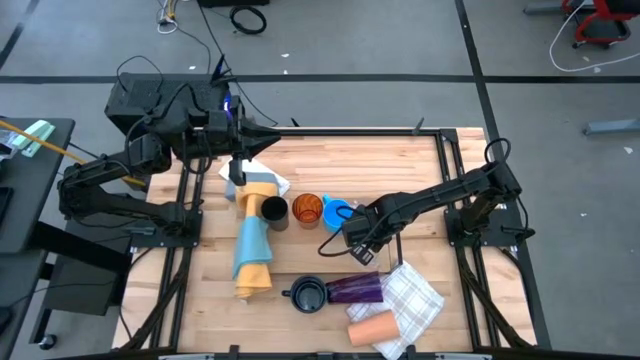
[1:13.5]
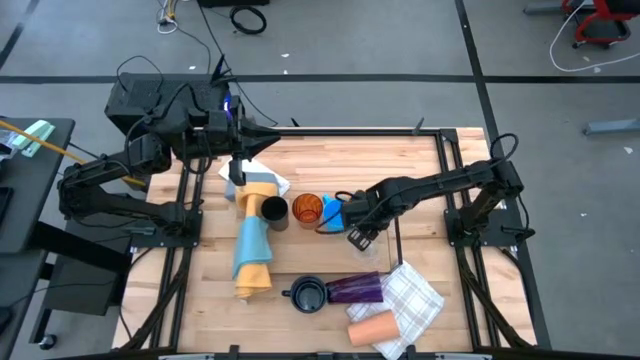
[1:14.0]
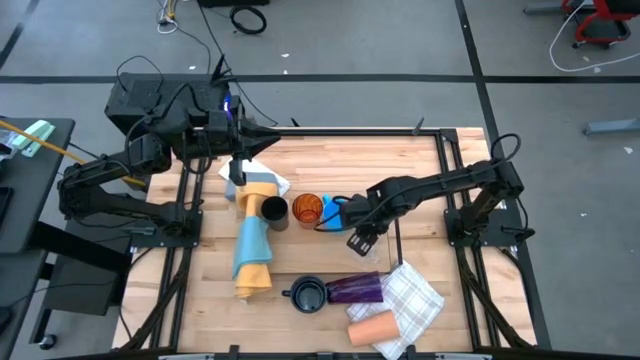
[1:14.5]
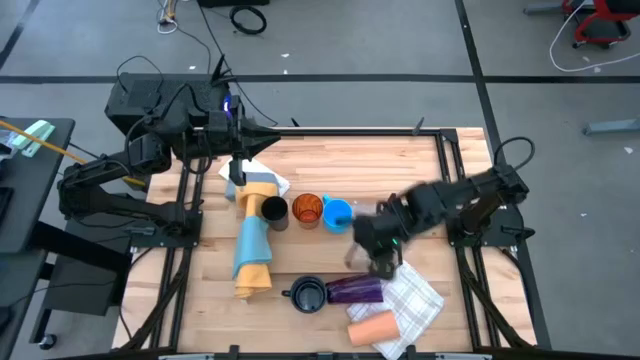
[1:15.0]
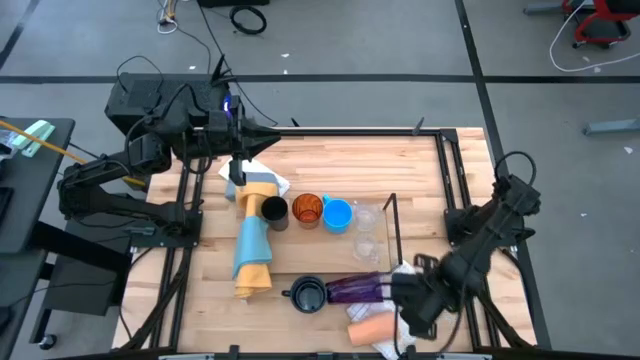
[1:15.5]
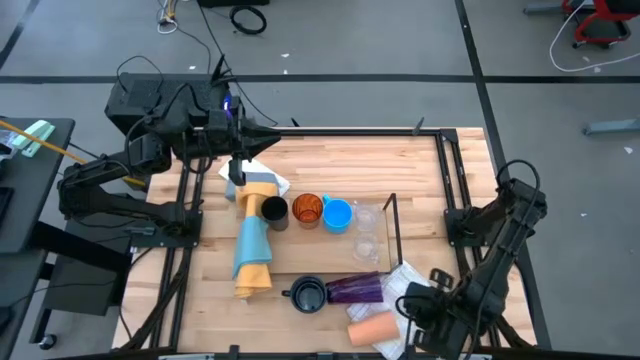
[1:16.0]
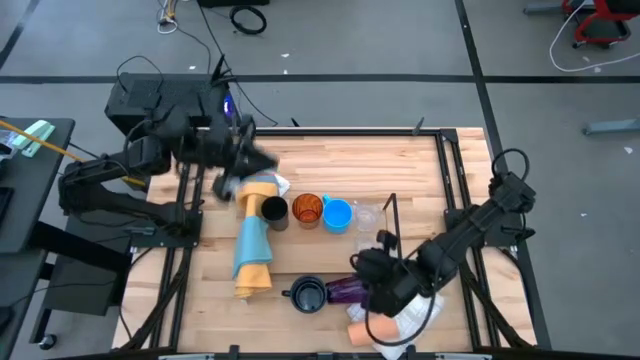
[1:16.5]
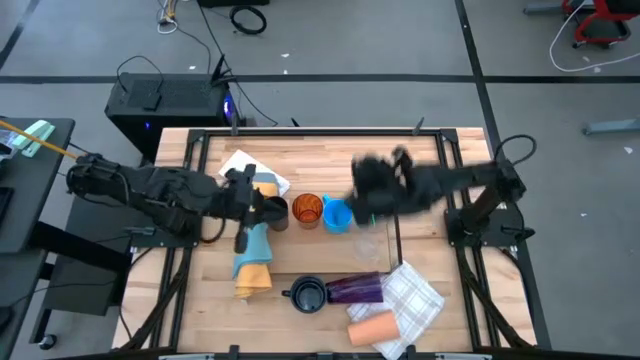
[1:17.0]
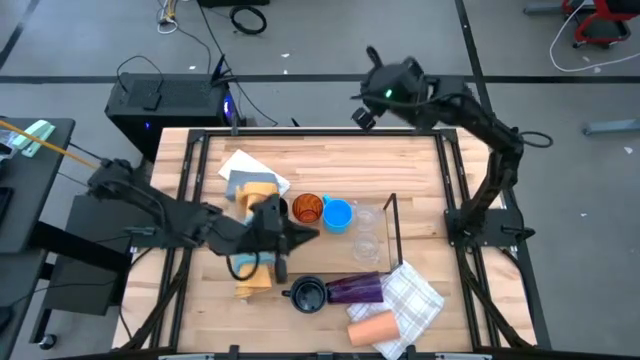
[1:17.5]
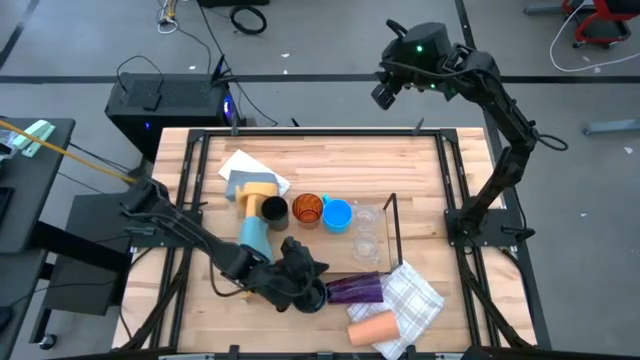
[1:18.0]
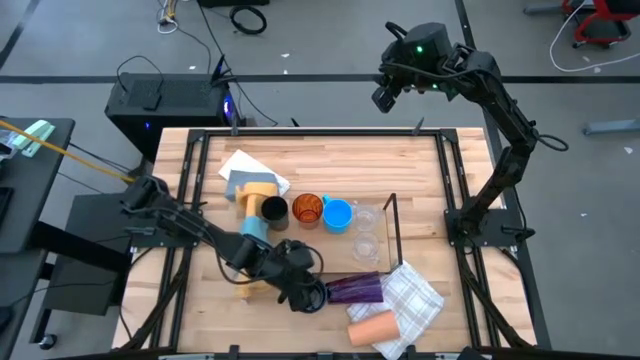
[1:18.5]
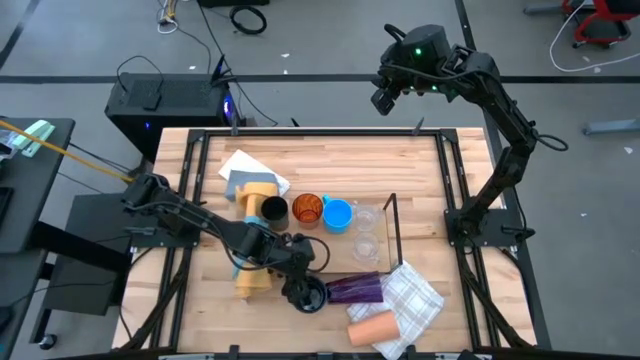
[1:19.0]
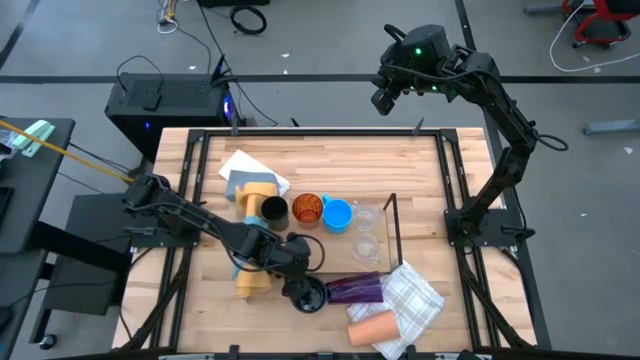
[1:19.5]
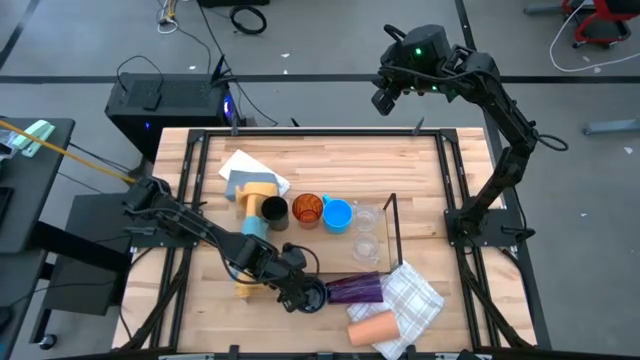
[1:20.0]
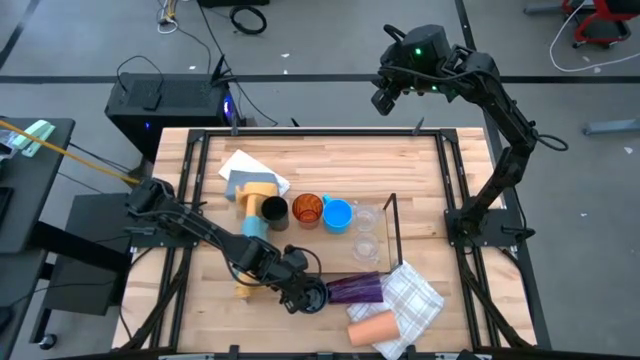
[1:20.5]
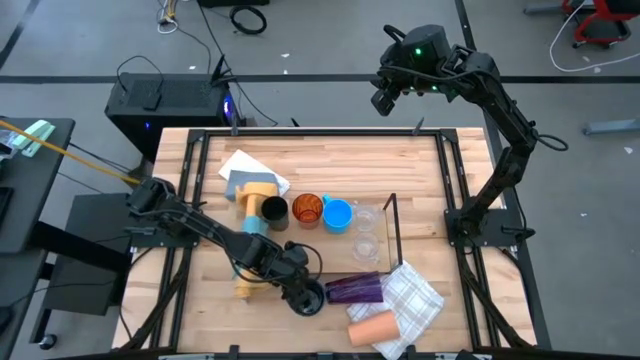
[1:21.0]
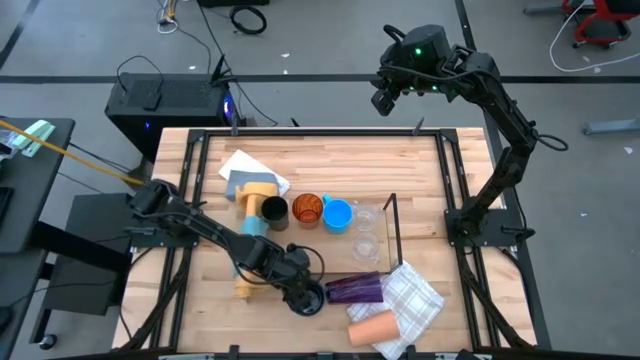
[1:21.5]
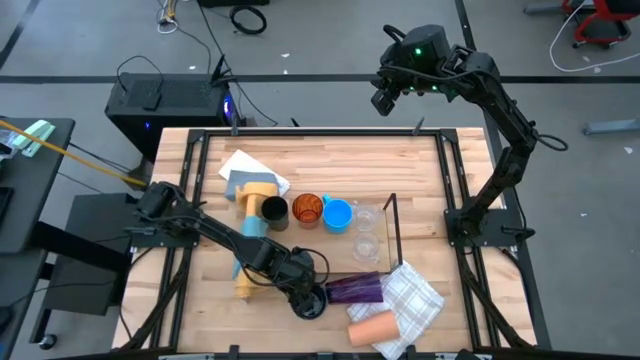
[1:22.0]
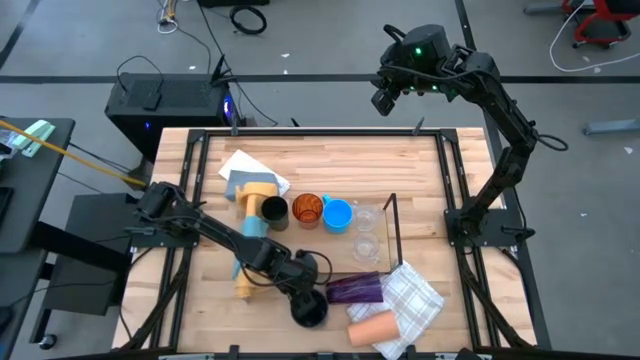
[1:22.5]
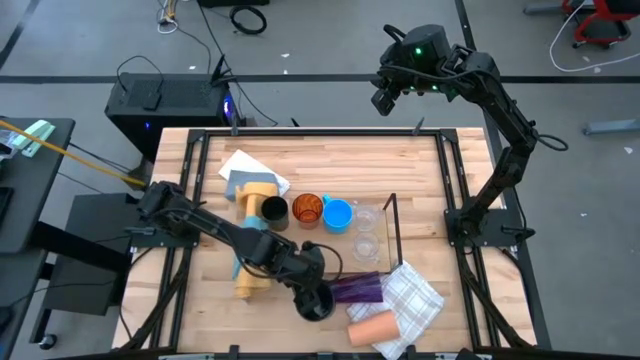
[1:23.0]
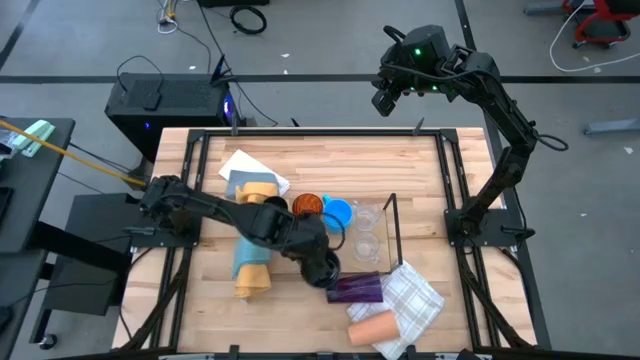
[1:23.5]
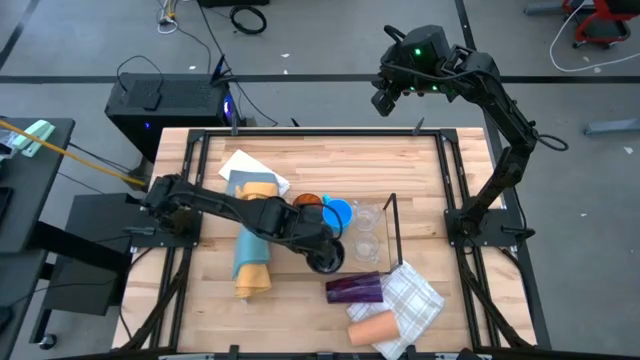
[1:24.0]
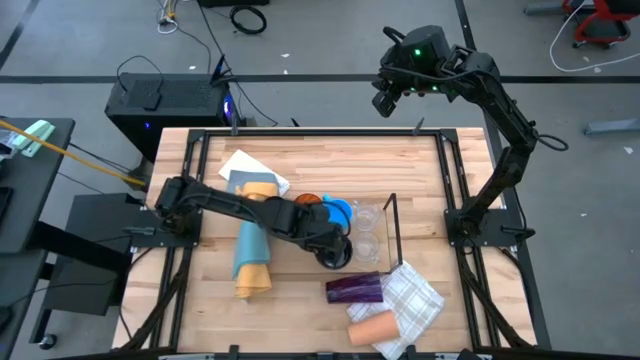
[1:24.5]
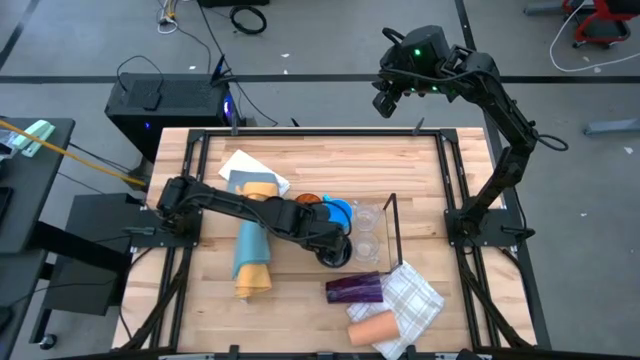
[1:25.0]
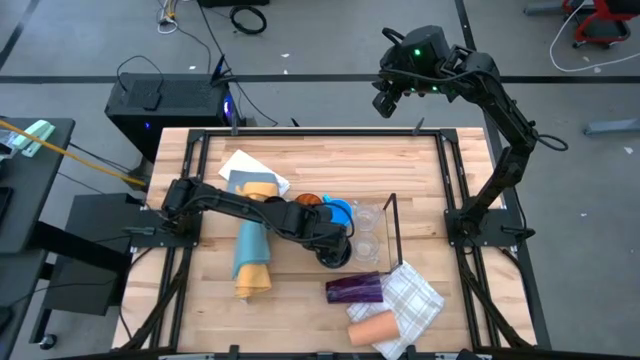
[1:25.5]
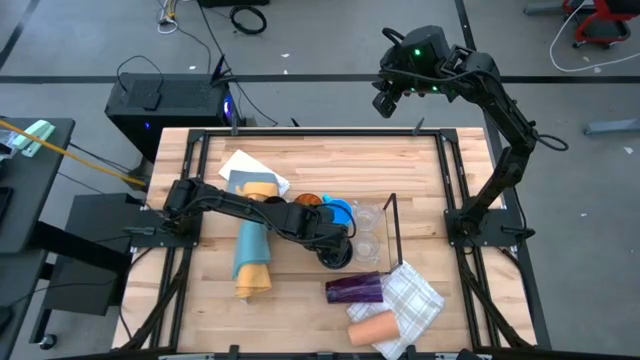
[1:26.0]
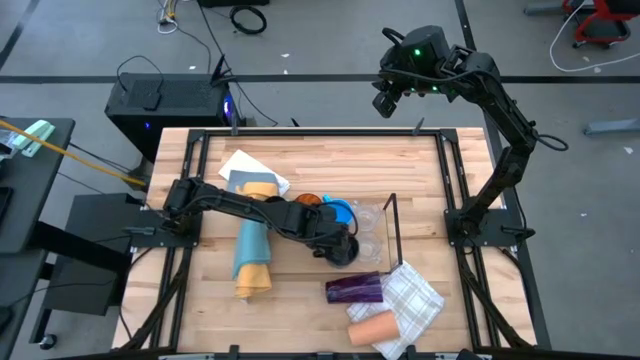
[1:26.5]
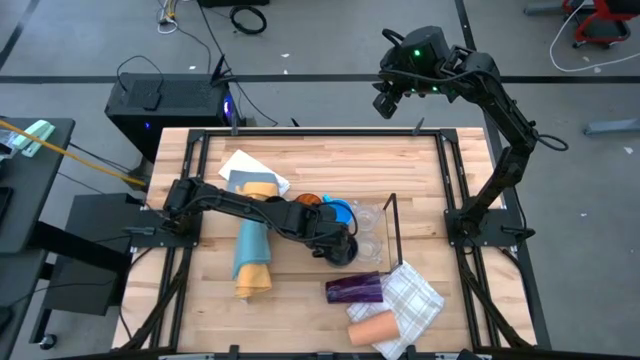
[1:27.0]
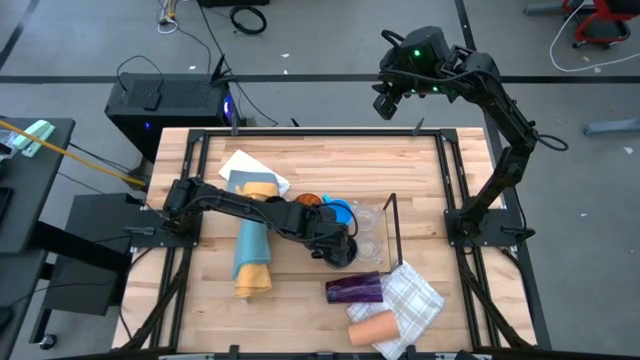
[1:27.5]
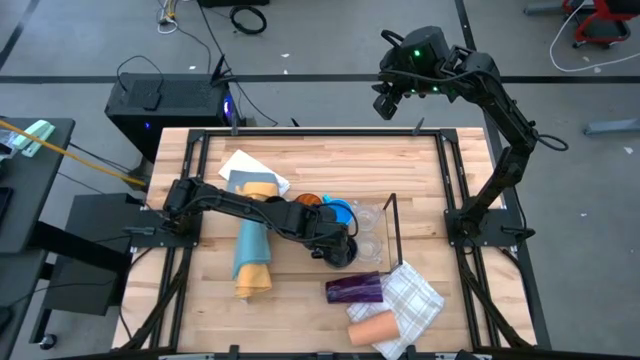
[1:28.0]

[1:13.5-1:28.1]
Task: Stack small to large cups/mugs on shelf
Put the black mug on the shelf

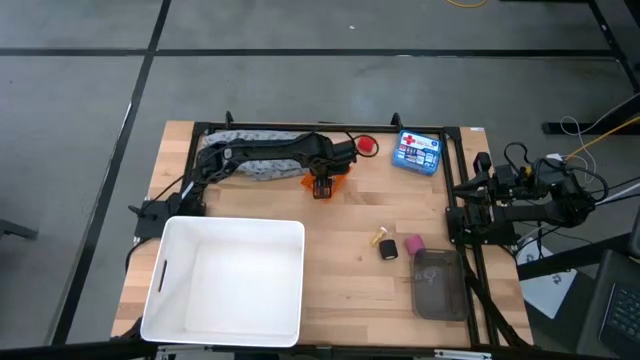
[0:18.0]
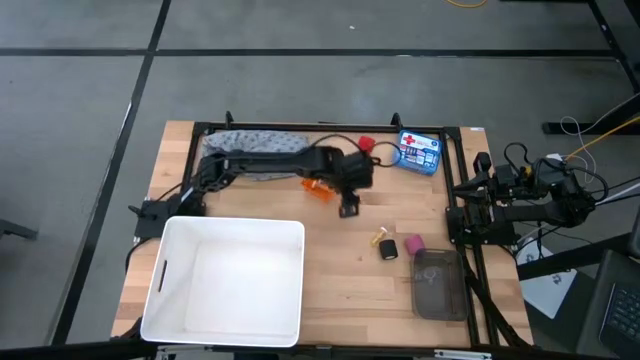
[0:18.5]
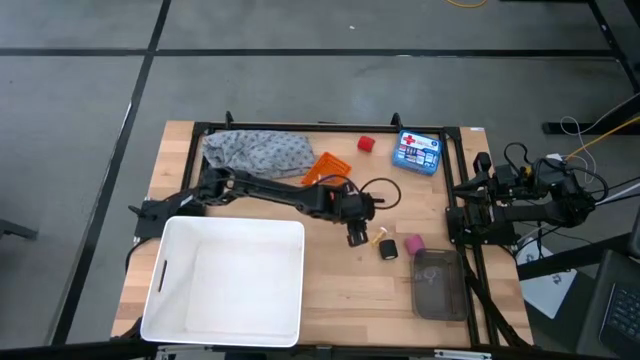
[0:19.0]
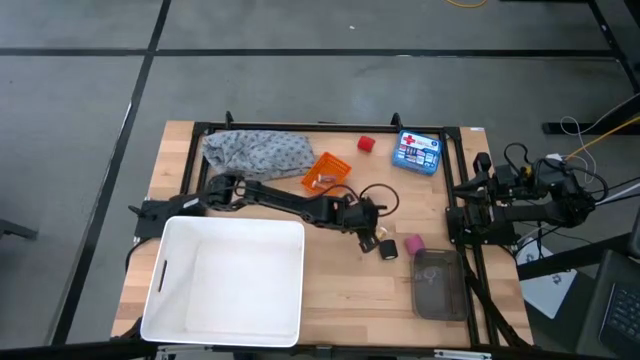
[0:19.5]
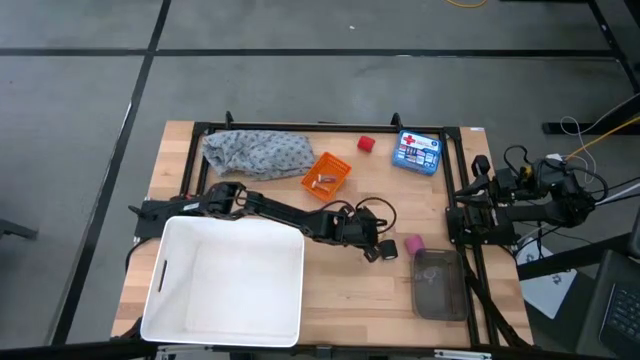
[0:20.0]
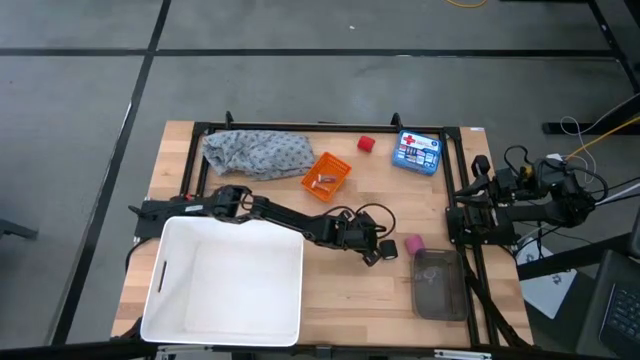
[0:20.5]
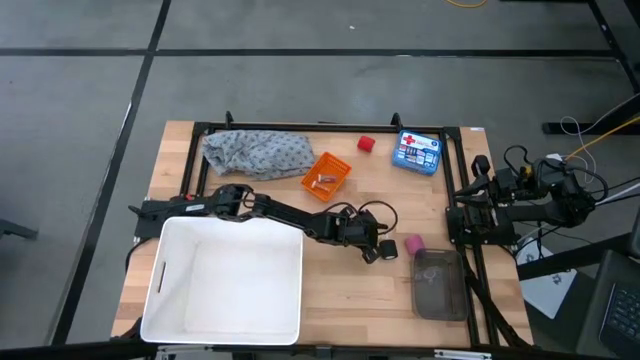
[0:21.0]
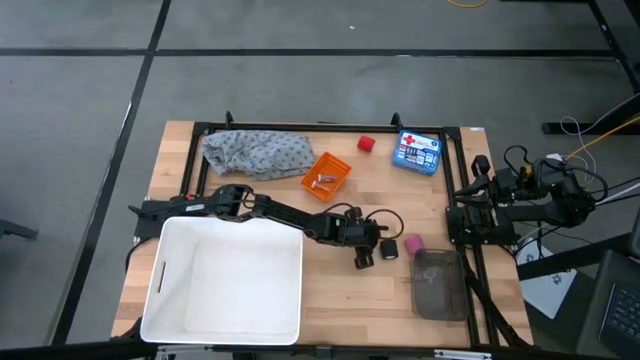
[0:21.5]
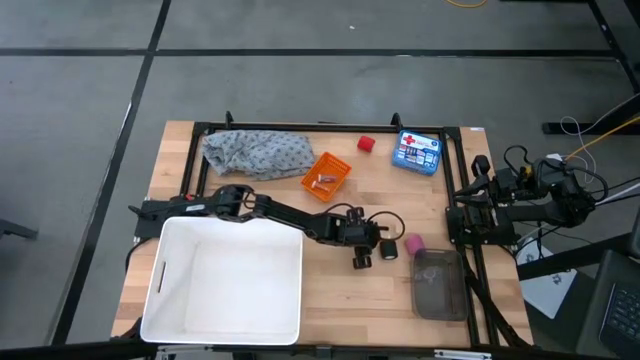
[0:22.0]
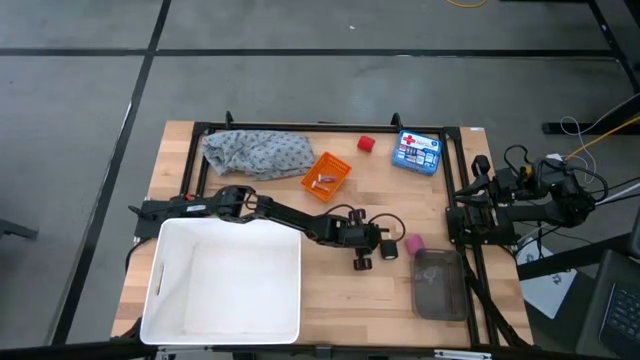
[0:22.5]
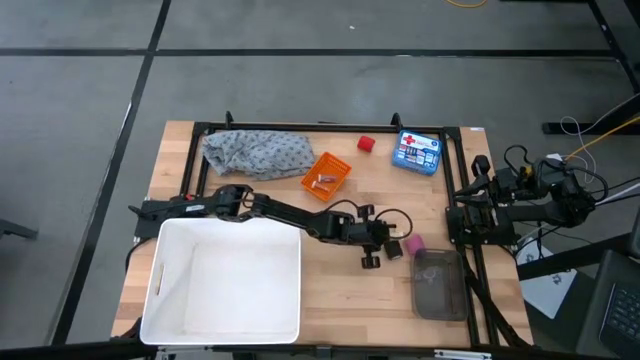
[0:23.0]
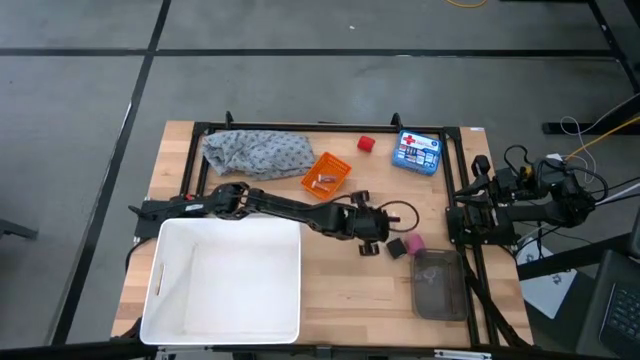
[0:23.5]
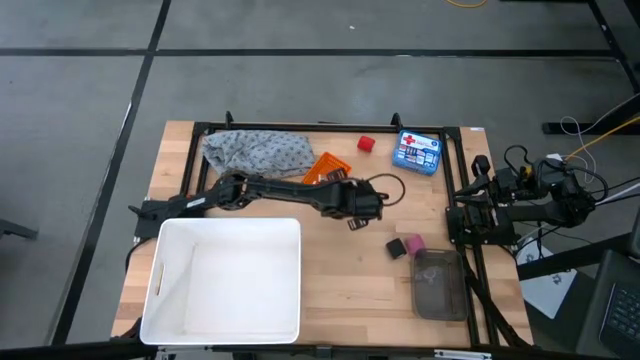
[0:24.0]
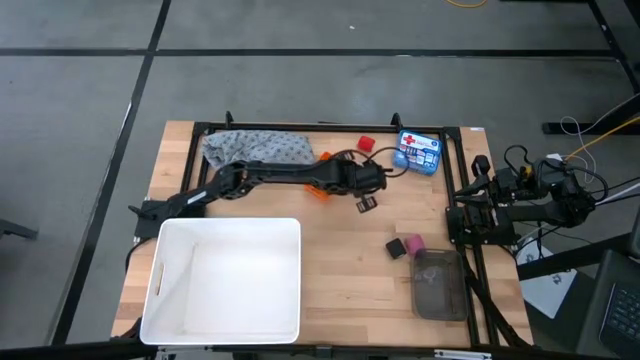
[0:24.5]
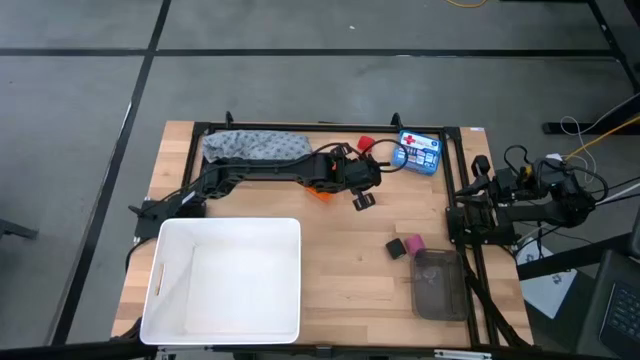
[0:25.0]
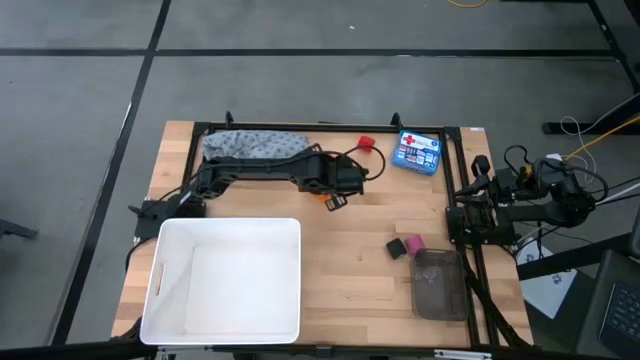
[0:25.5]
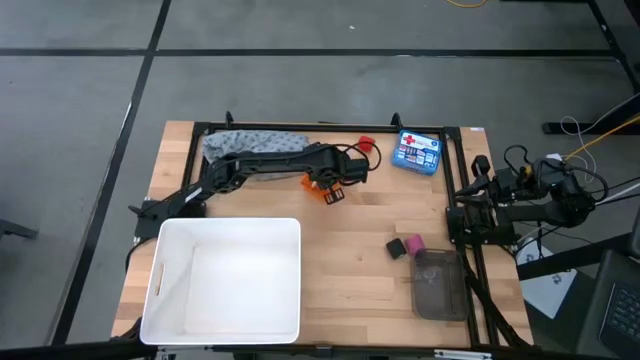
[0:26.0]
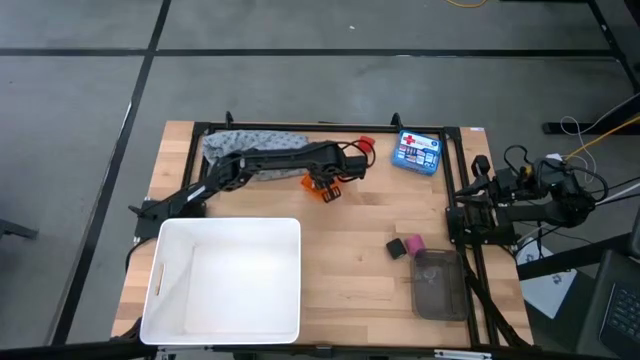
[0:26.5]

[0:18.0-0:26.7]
Task: Pick & place medical supplies in basket/bin
Put the yellow pill bottle into the orange bin
